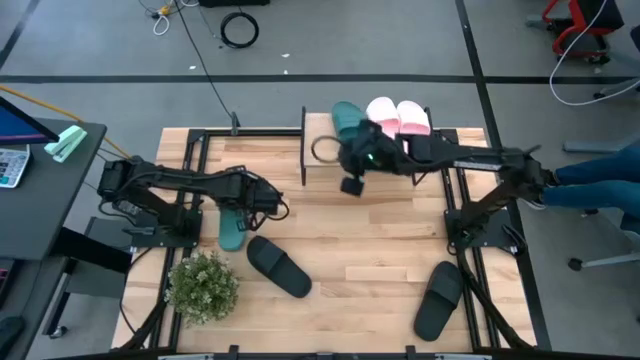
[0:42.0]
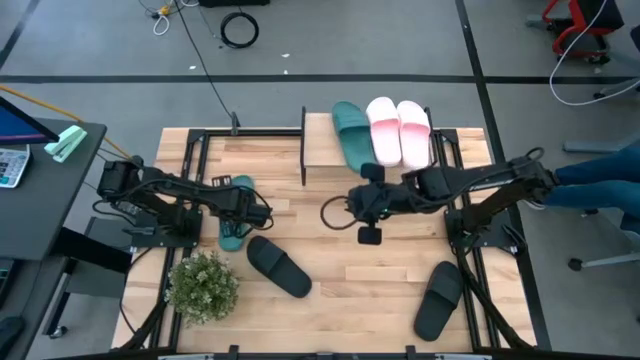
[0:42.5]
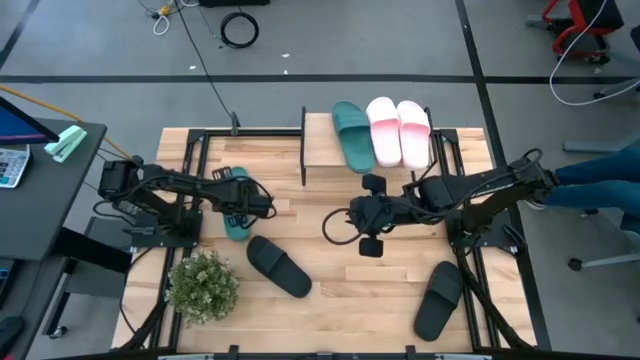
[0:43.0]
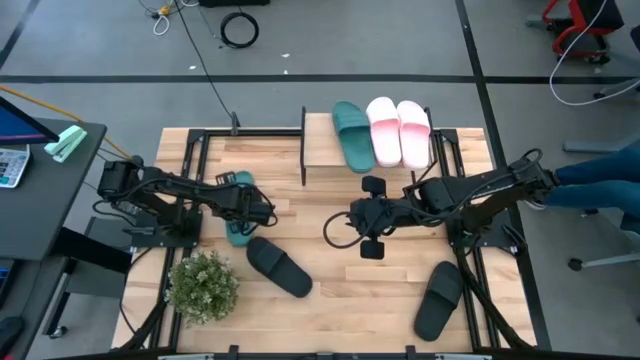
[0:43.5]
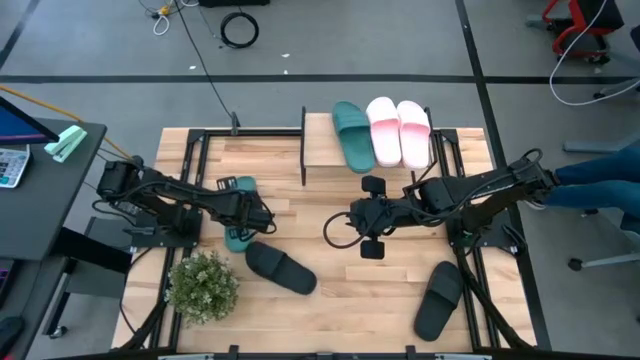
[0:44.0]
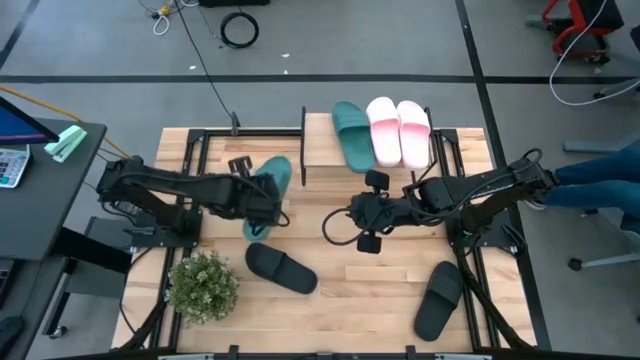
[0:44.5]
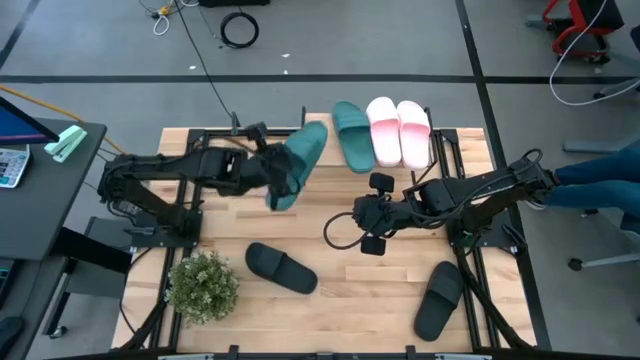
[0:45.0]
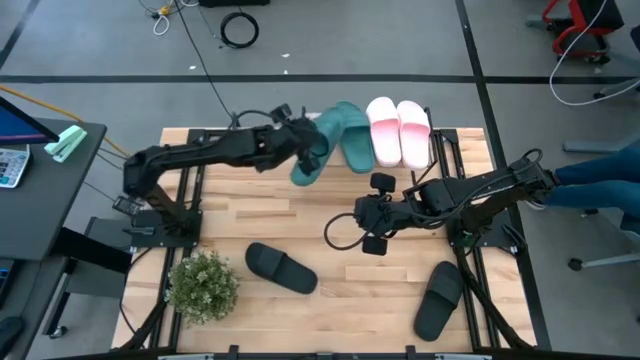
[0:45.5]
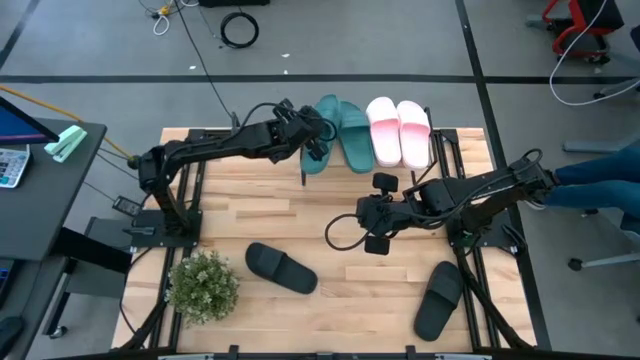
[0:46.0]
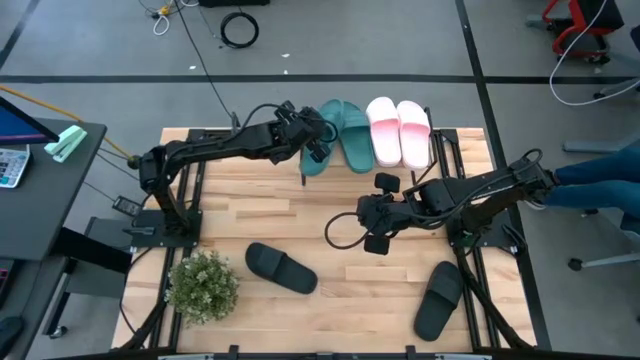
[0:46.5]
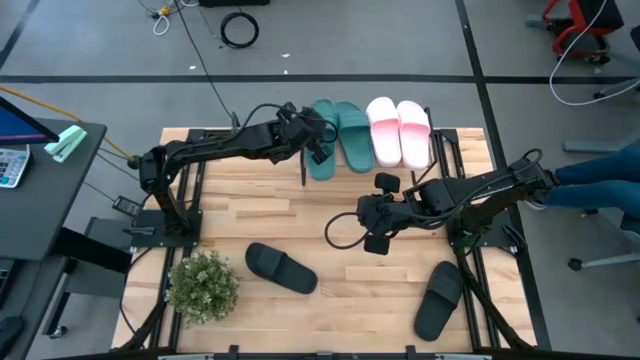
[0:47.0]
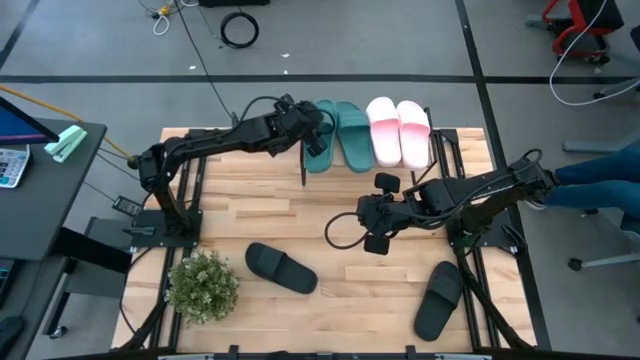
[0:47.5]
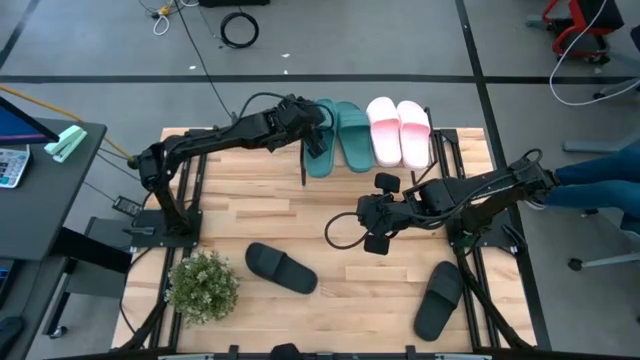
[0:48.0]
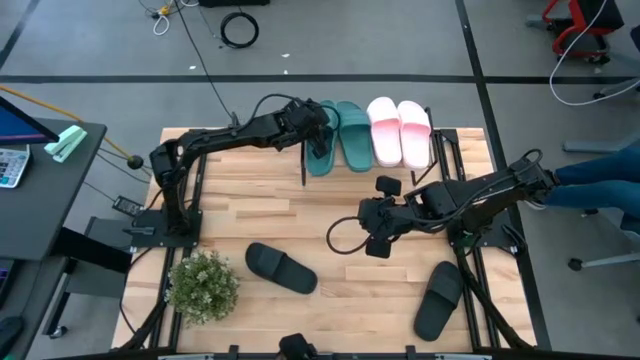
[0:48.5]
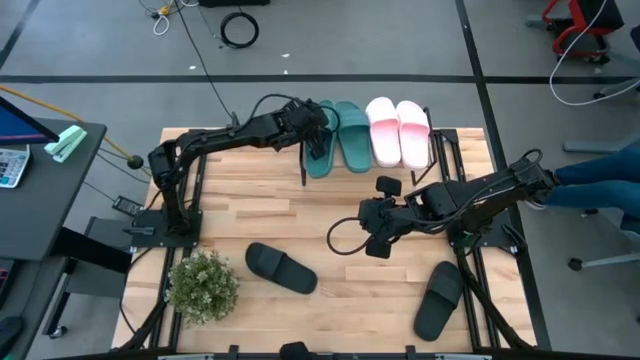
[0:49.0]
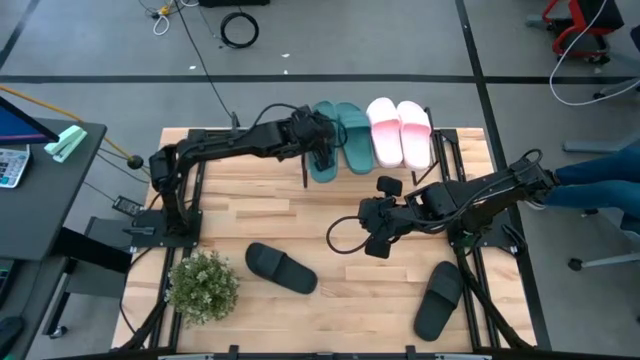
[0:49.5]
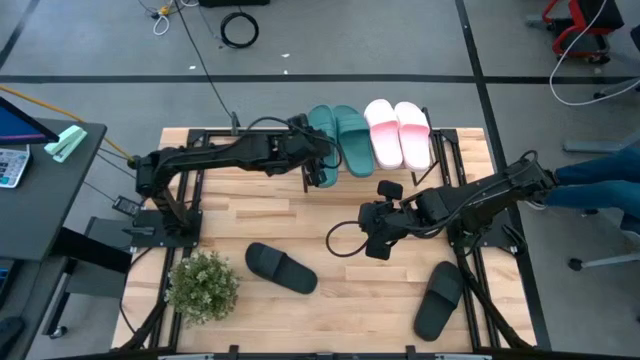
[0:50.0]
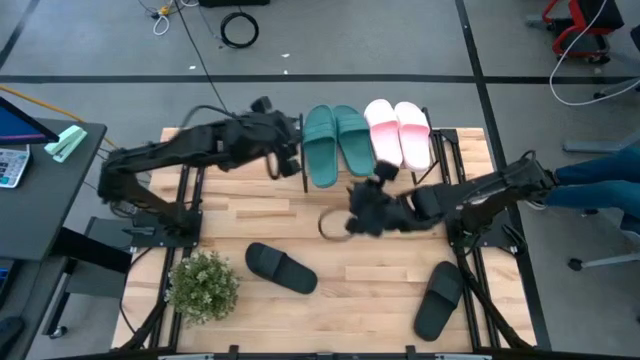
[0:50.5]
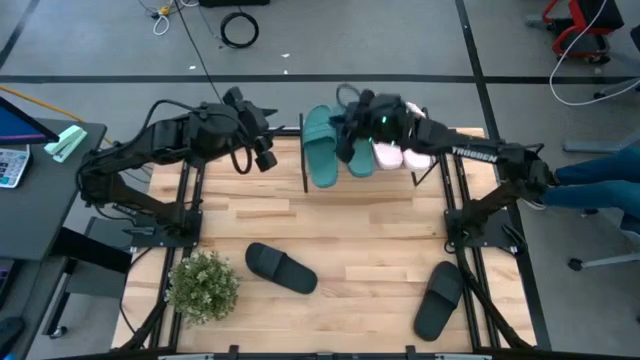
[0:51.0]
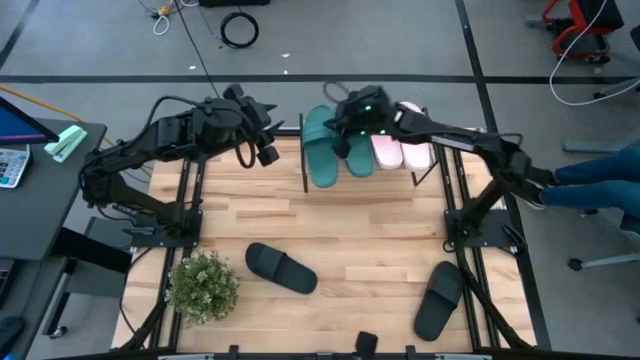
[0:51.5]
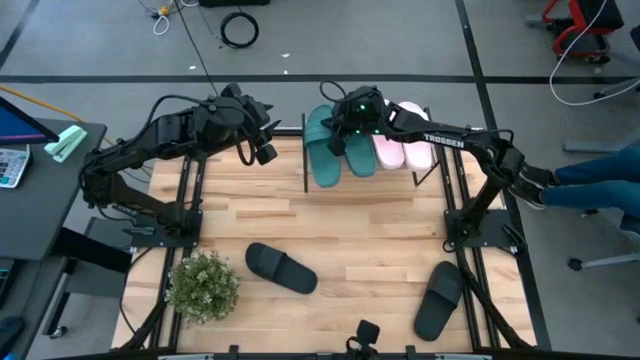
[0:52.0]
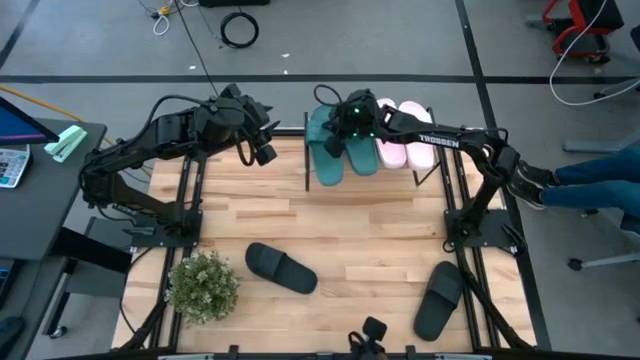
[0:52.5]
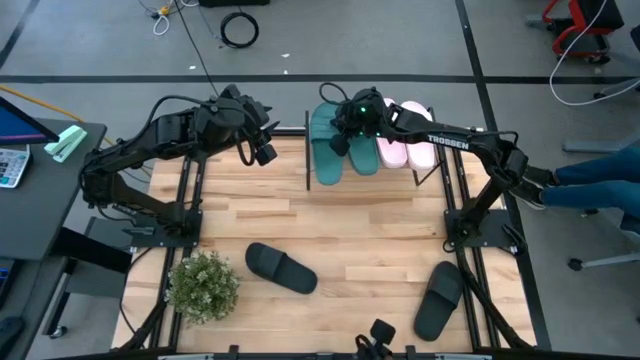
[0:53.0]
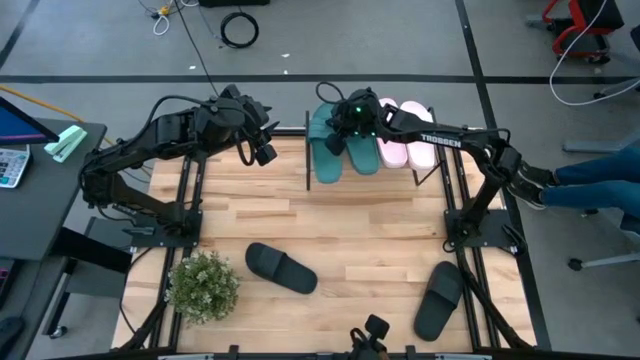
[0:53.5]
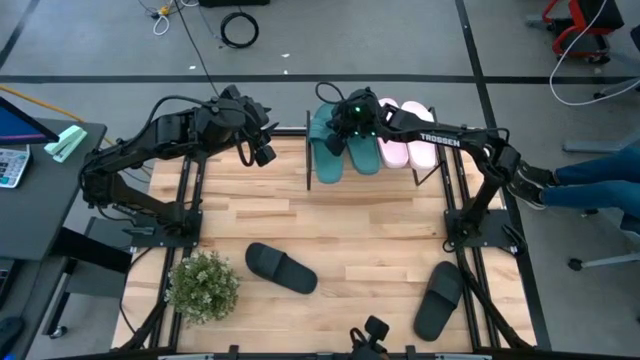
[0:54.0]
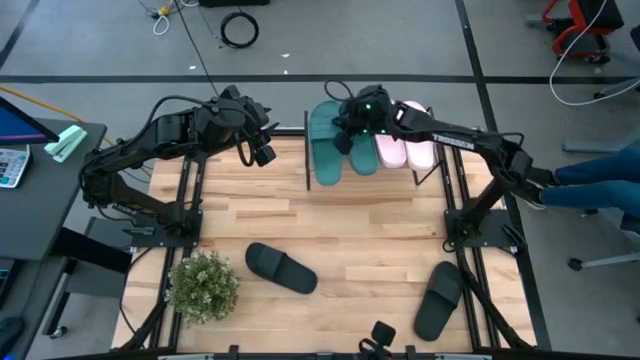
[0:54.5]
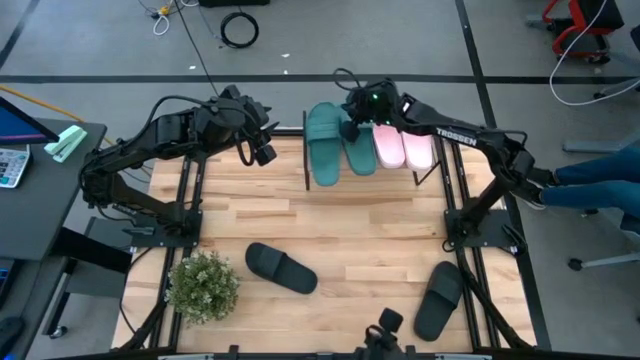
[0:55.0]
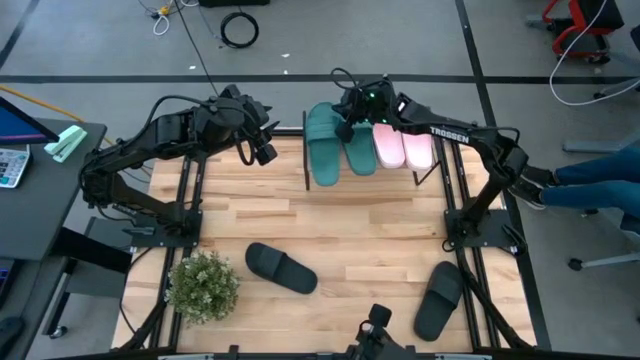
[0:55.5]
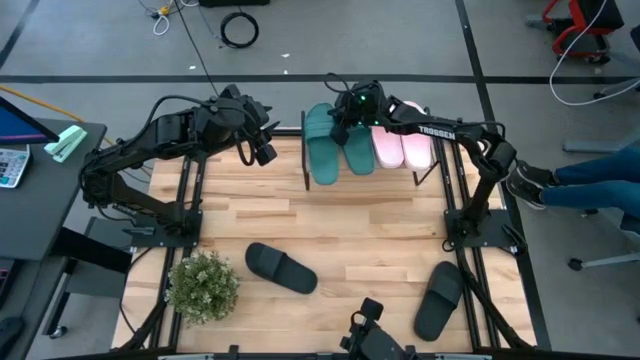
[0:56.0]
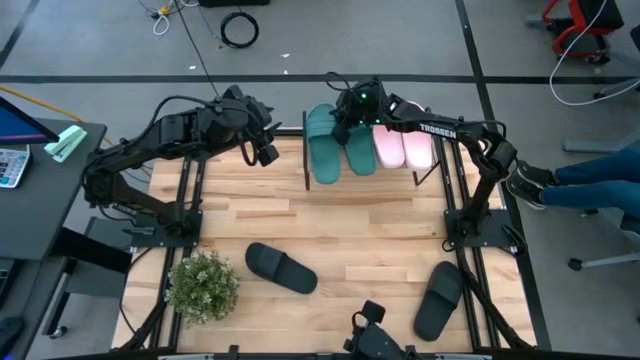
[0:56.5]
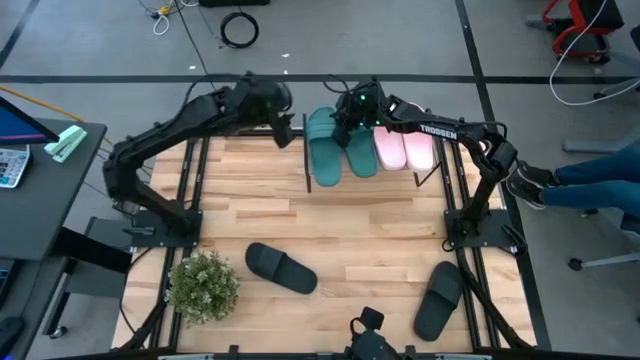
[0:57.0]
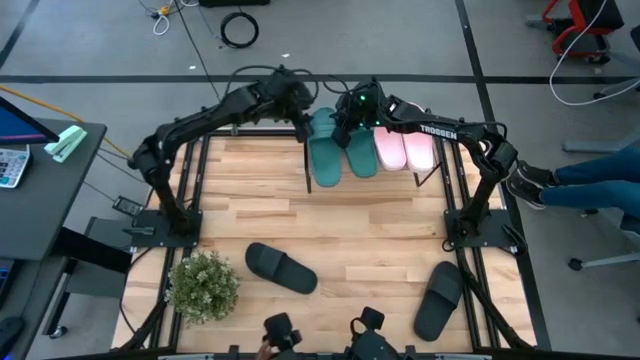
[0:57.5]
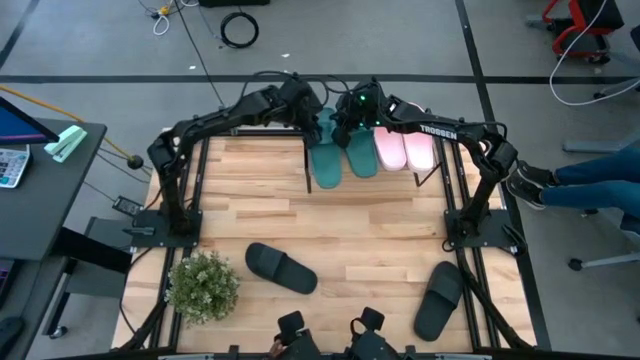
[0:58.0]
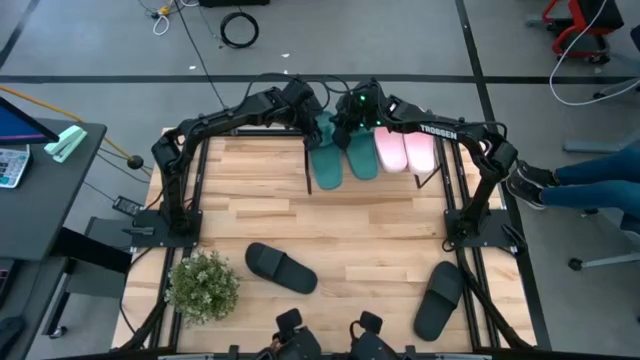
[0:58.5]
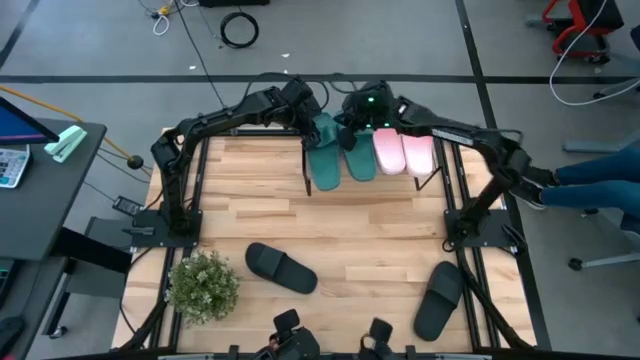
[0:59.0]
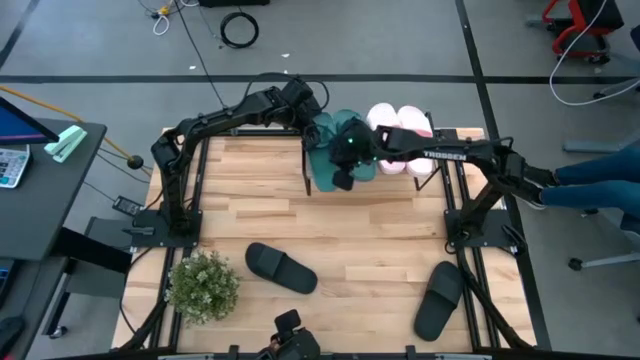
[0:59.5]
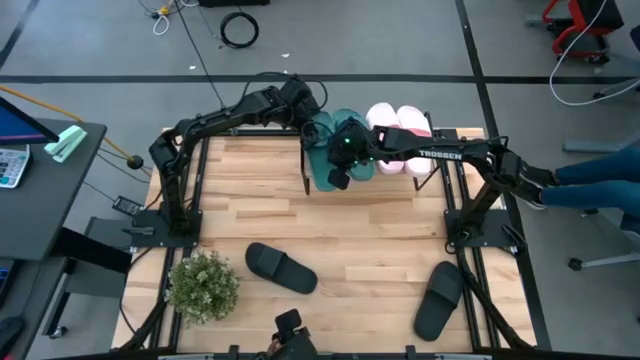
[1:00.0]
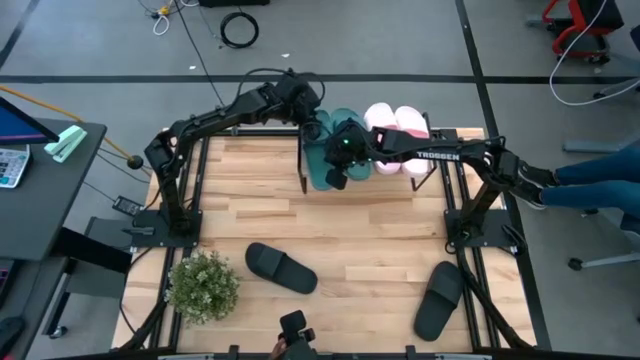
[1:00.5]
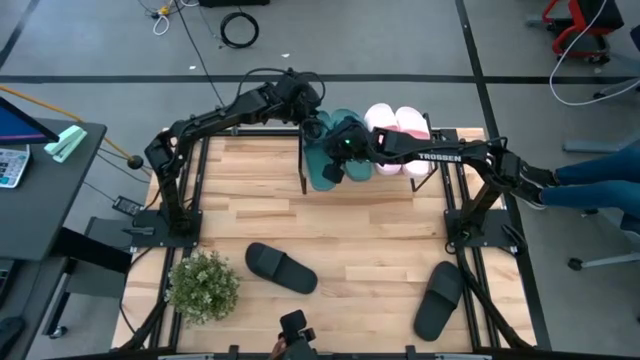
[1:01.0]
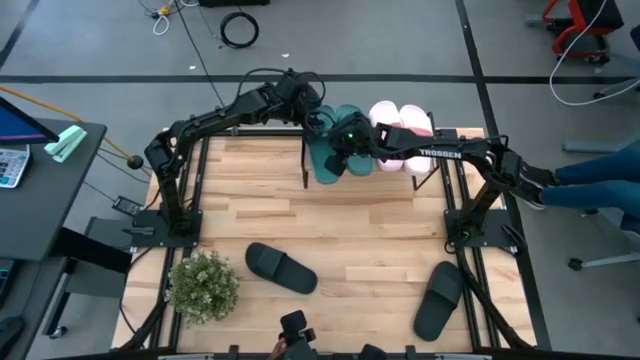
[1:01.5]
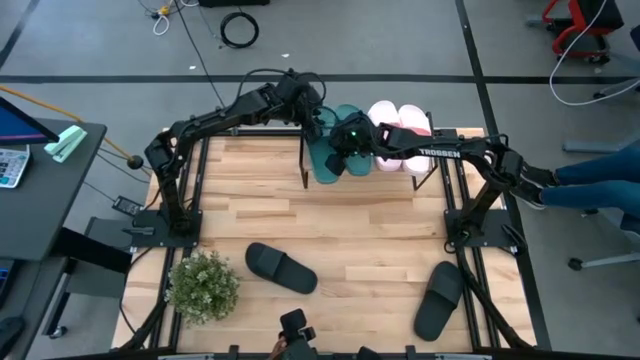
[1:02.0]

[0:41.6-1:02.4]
Task: Pick and place slides into the shelf
Put the green slipper on the shelf
